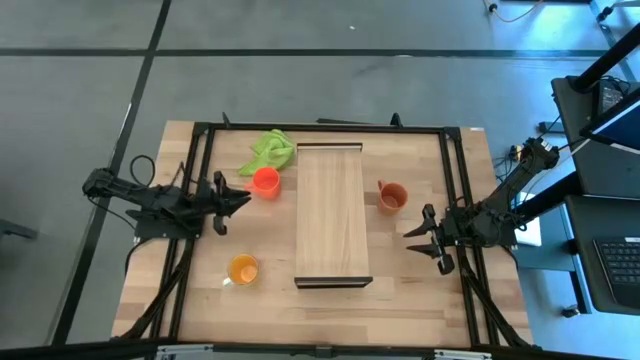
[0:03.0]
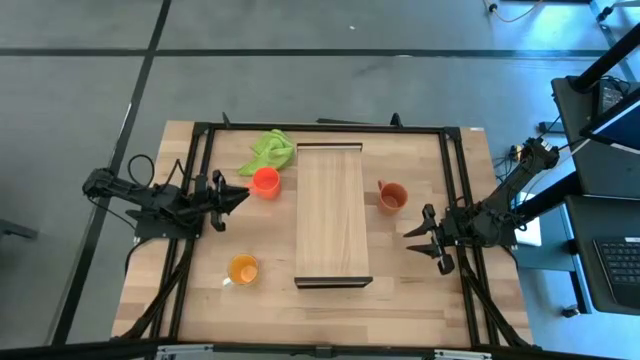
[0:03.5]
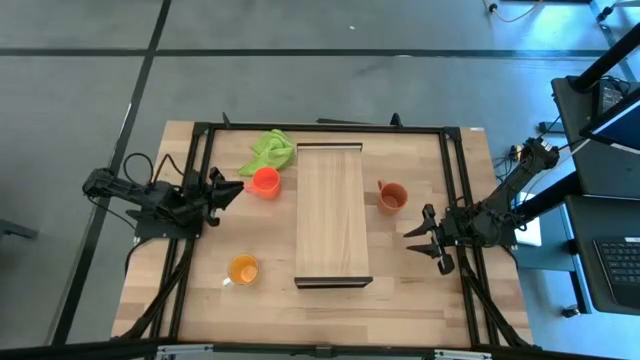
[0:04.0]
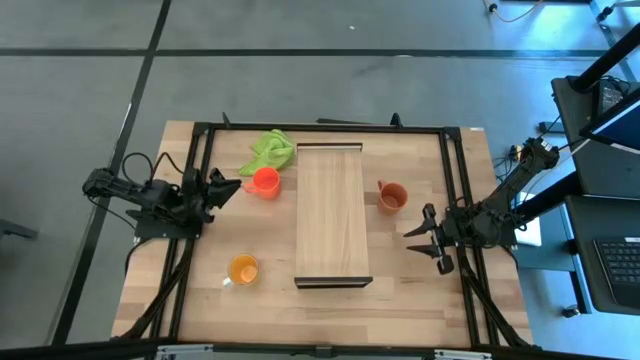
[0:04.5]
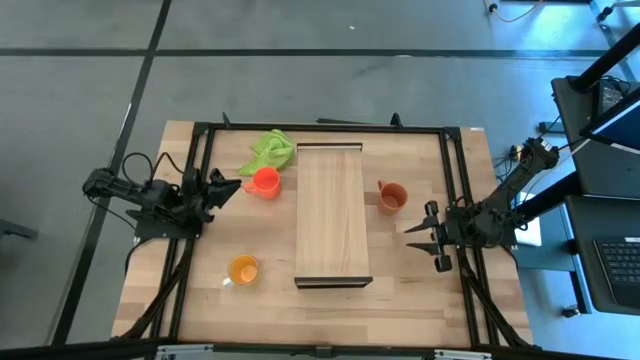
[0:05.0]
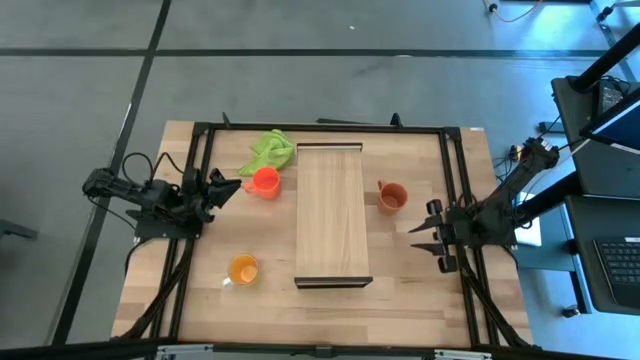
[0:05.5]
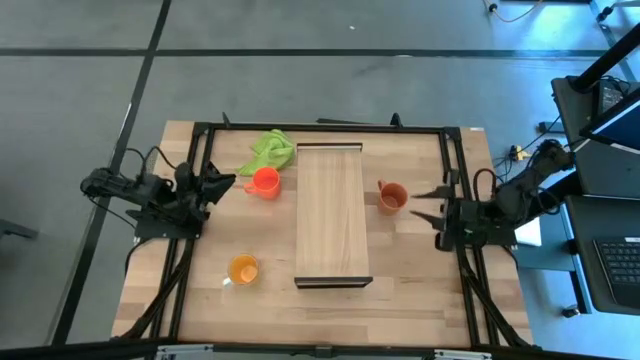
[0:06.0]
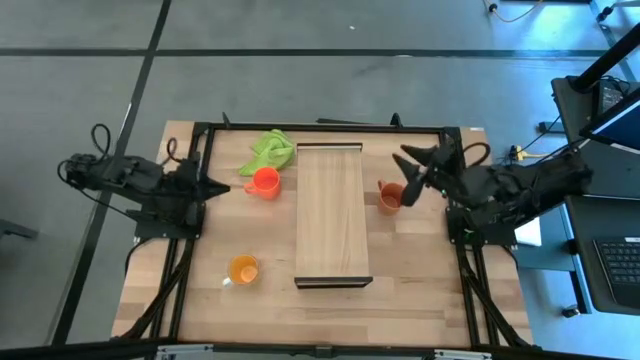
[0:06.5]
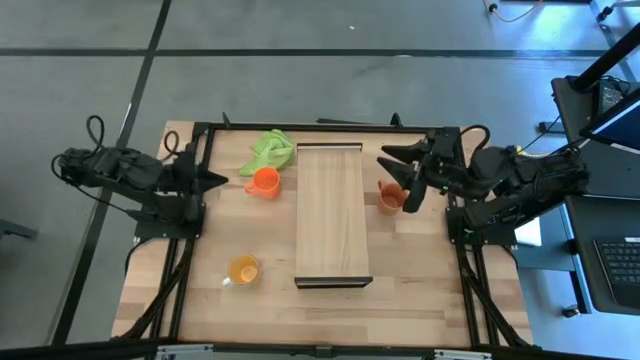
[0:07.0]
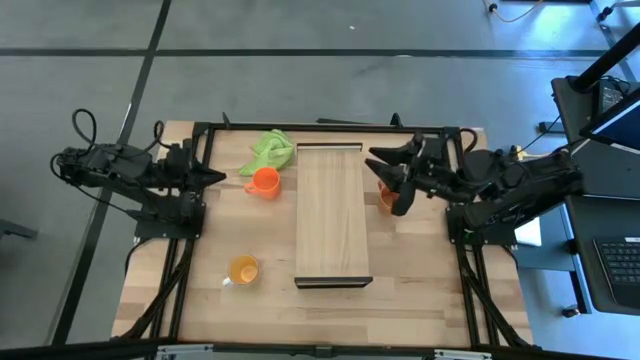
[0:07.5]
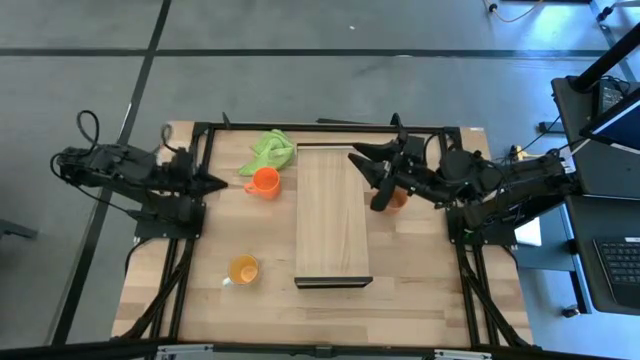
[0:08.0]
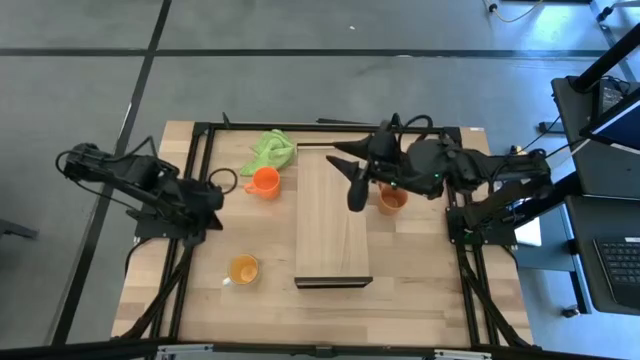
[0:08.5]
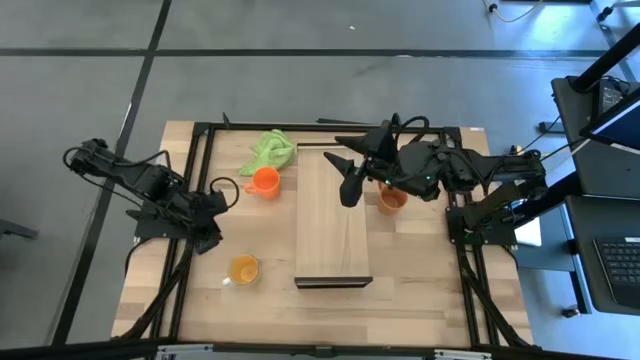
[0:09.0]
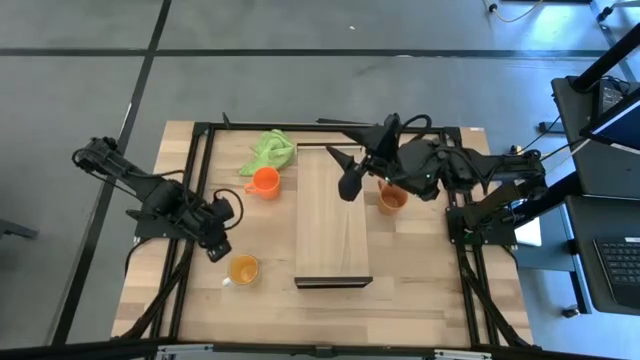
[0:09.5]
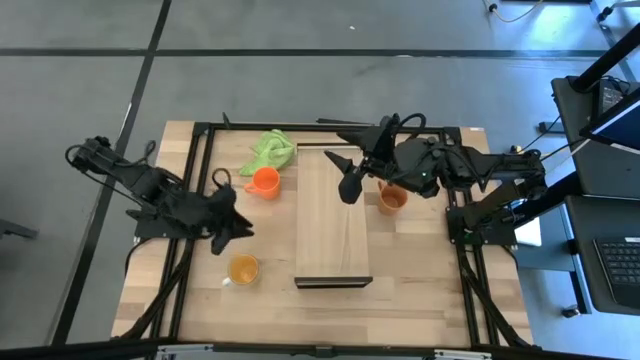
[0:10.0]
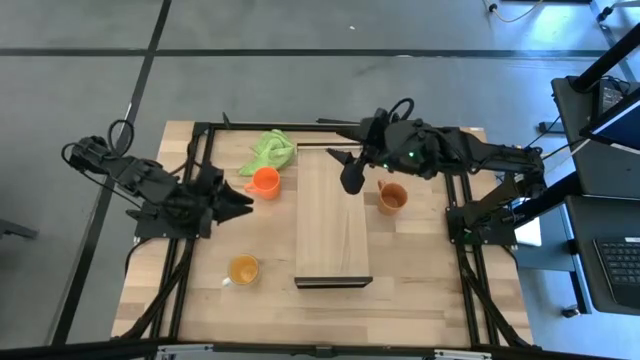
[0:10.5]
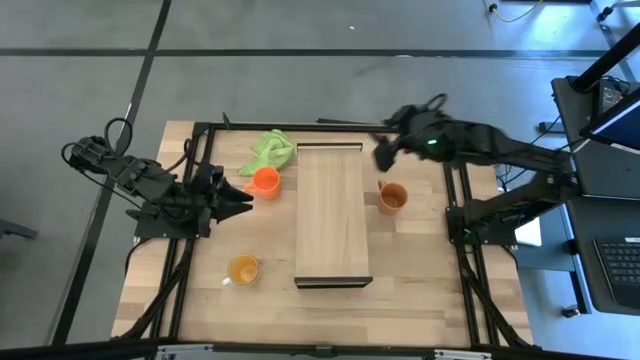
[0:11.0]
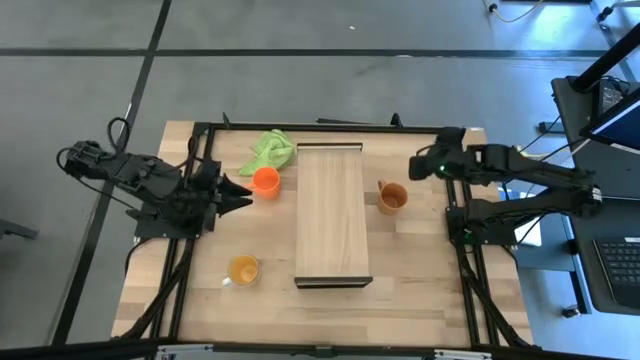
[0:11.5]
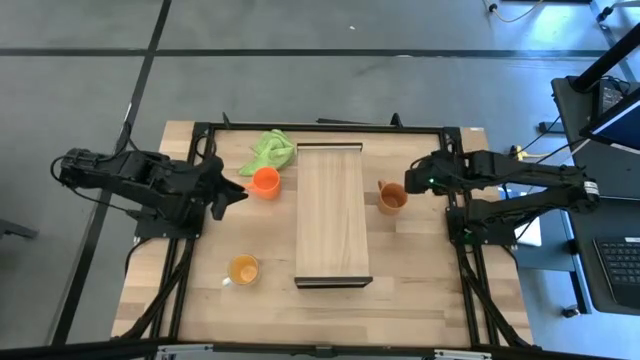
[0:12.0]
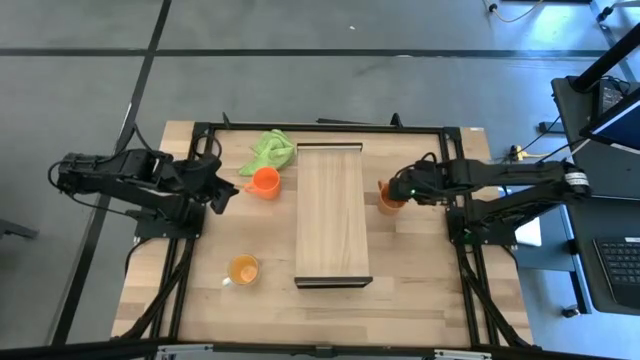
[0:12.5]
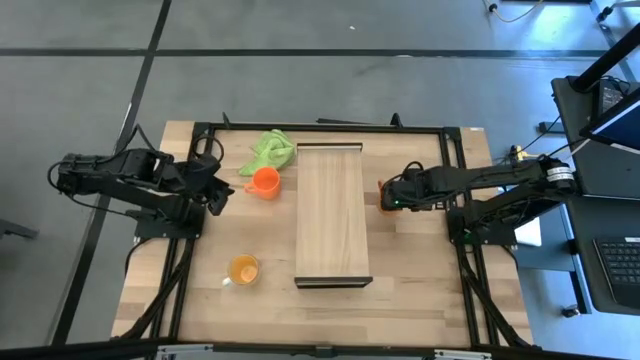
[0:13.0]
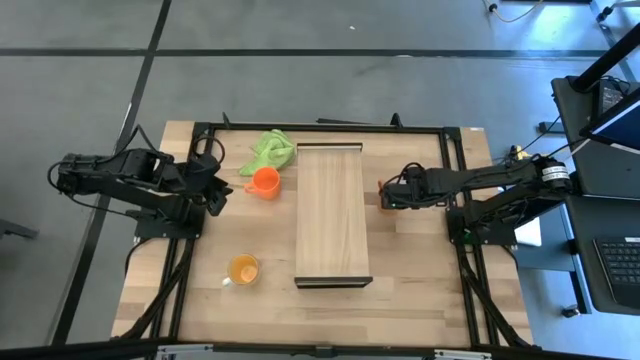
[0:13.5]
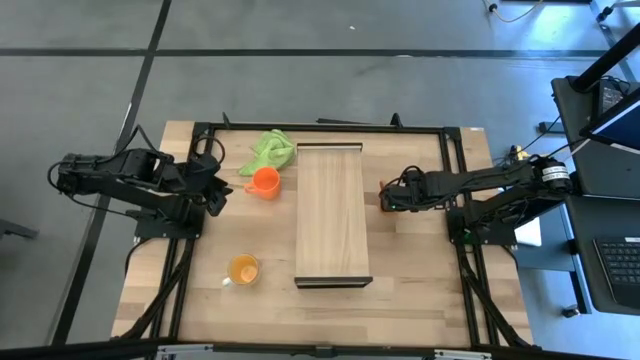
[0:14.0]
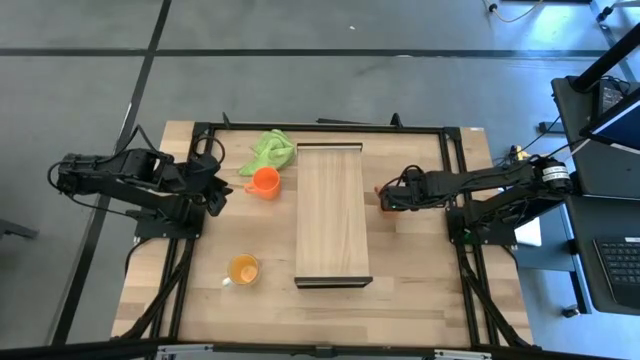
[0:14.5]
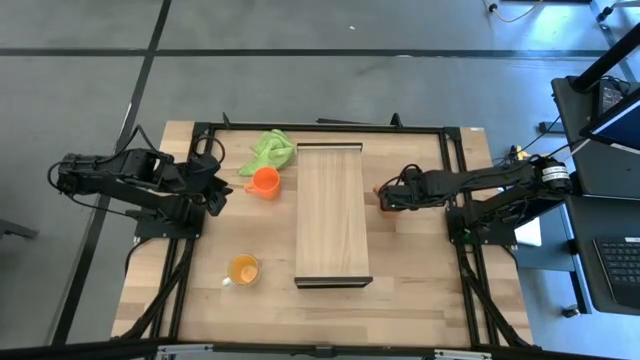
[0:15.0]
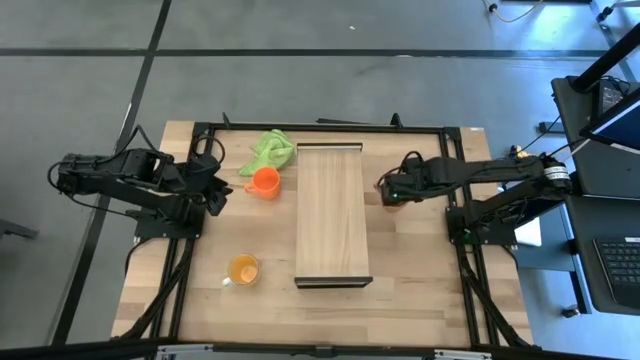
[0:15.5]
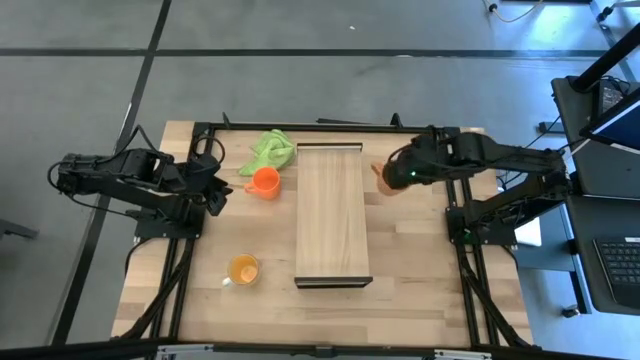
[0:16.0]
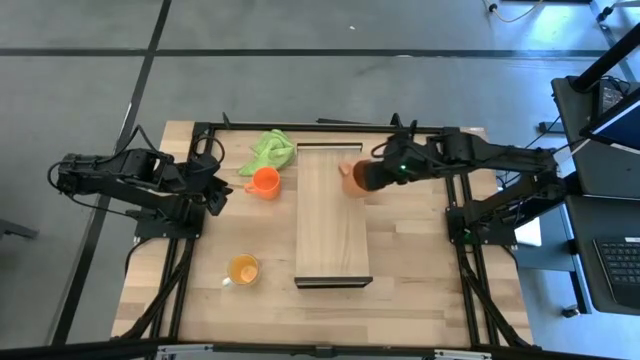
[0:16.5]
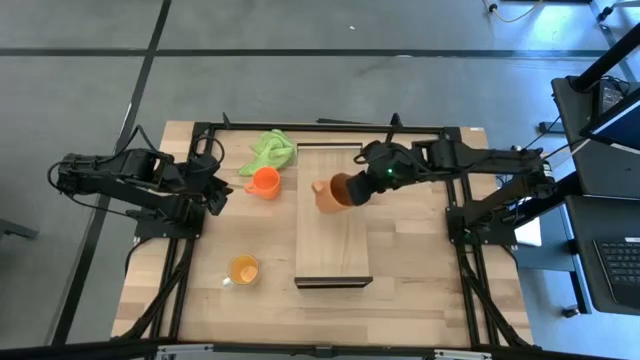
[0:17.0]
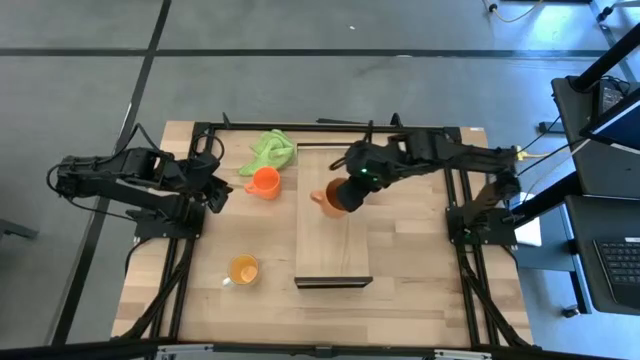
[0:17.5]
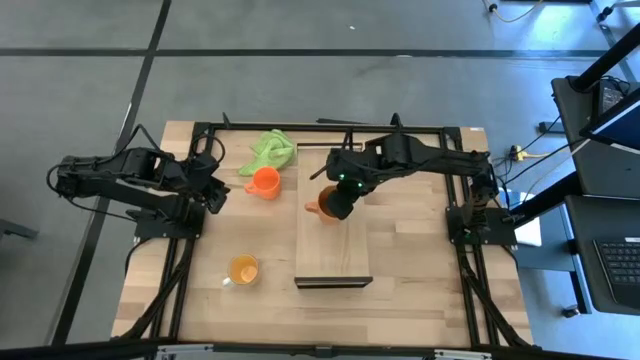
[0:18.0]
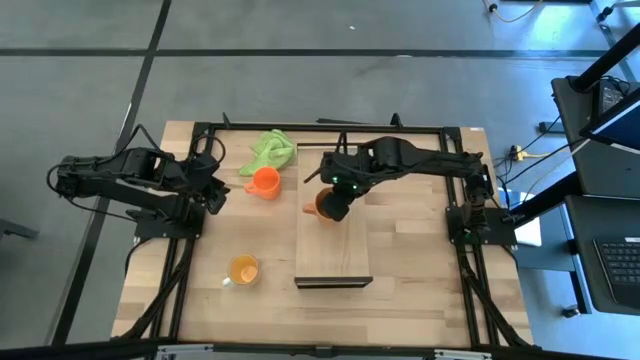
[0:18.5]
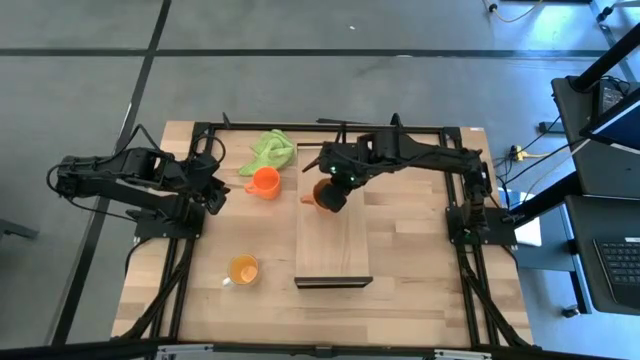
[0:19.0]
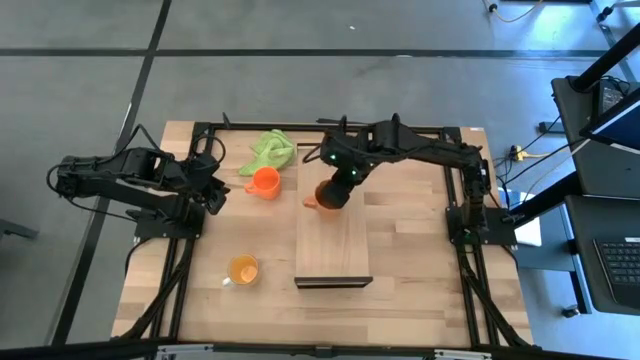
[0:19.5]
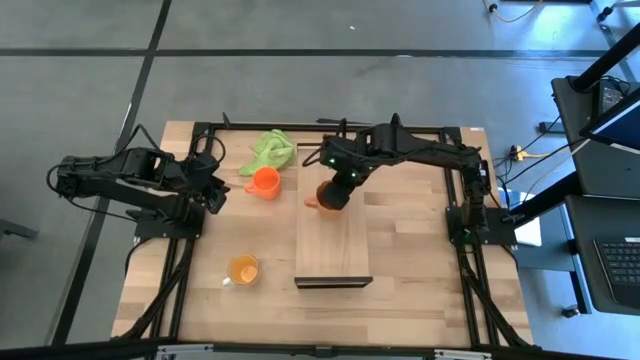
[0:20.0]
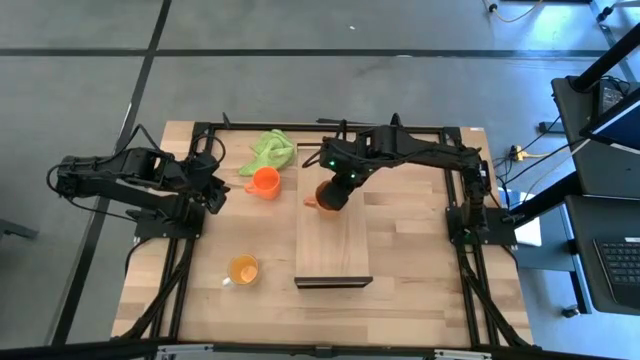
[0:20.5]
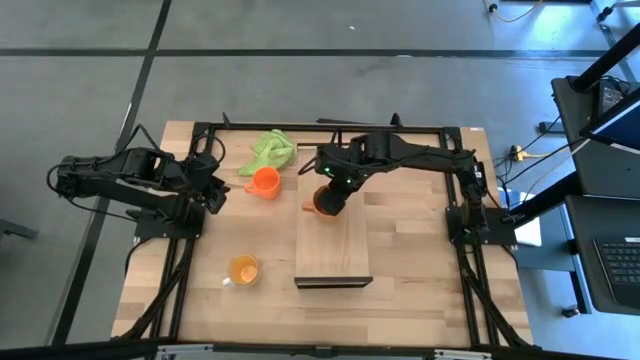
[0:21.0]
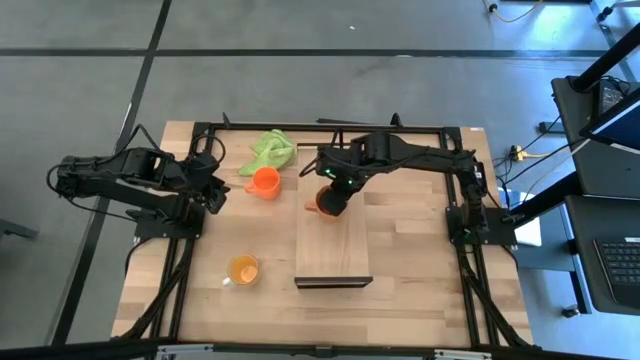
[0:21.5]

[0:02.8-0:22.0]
Task: Stack small to large cups/mugs on shelf
Put the brown mug on the shelf
